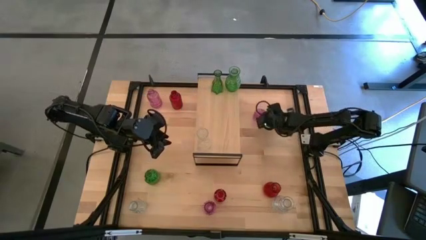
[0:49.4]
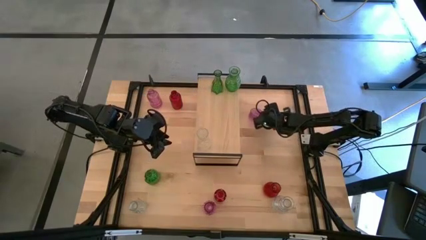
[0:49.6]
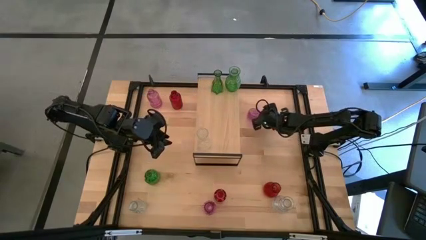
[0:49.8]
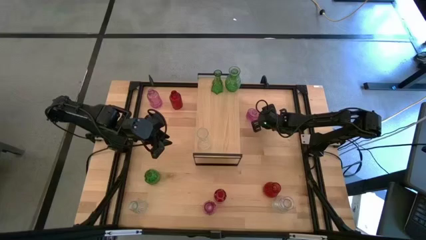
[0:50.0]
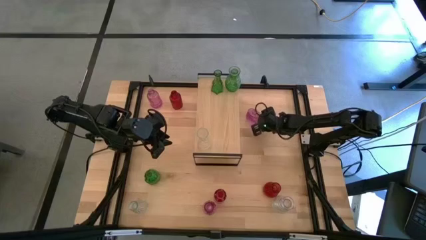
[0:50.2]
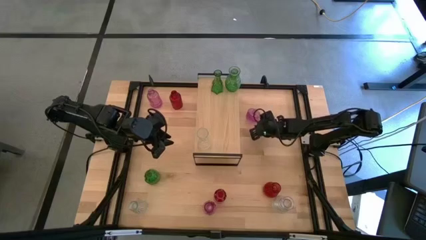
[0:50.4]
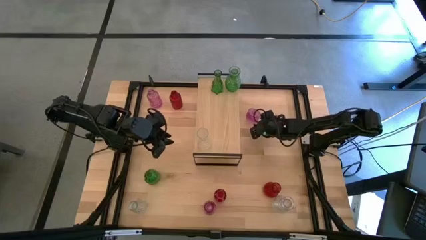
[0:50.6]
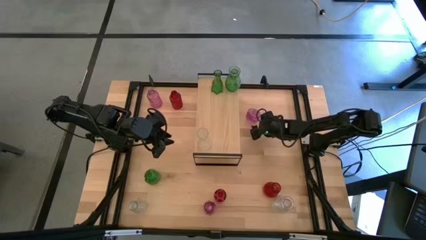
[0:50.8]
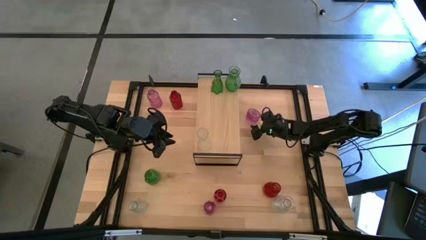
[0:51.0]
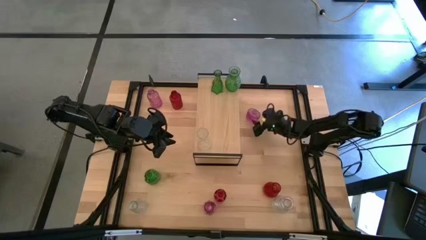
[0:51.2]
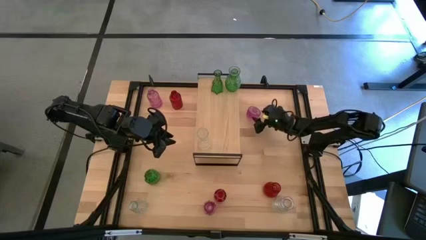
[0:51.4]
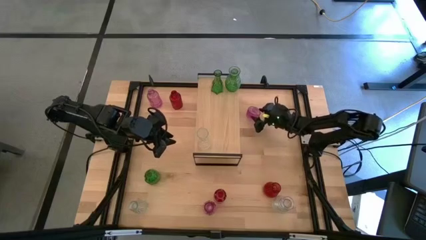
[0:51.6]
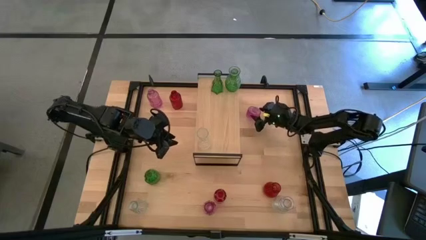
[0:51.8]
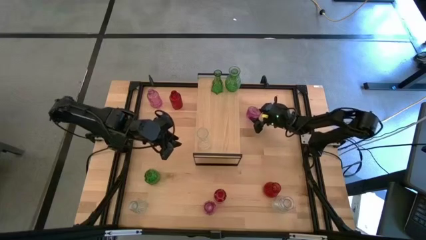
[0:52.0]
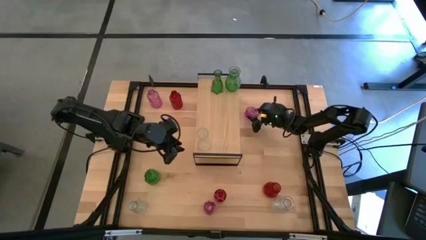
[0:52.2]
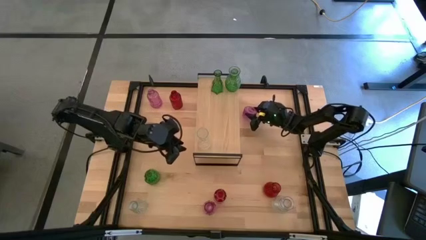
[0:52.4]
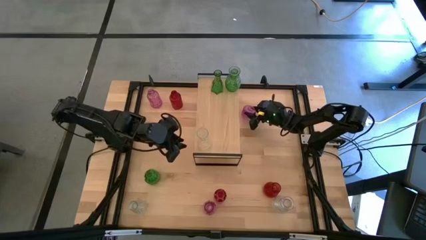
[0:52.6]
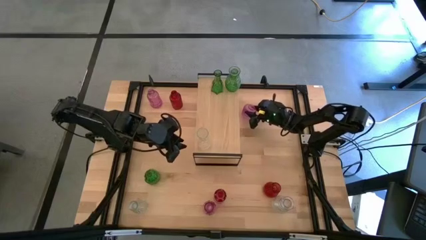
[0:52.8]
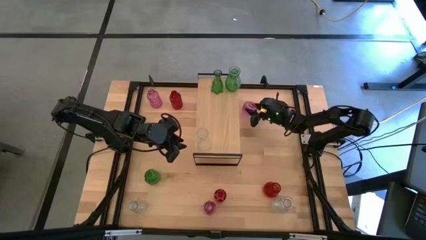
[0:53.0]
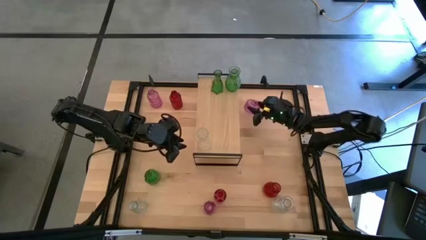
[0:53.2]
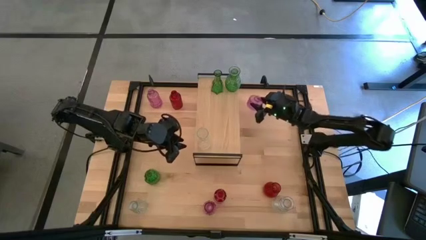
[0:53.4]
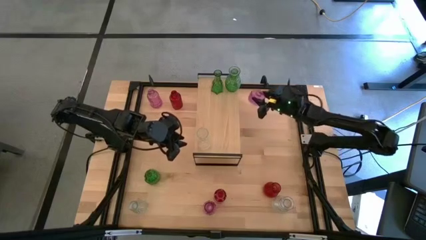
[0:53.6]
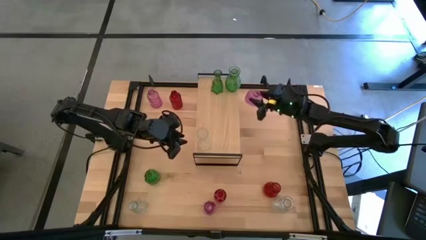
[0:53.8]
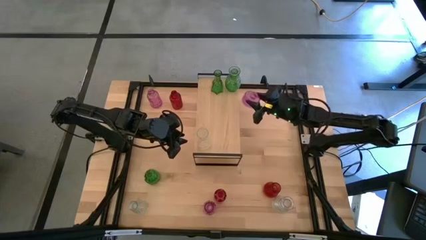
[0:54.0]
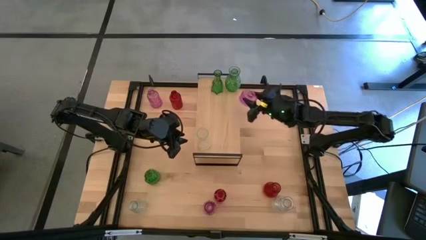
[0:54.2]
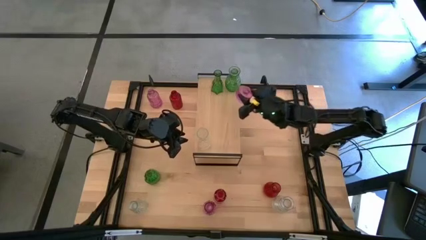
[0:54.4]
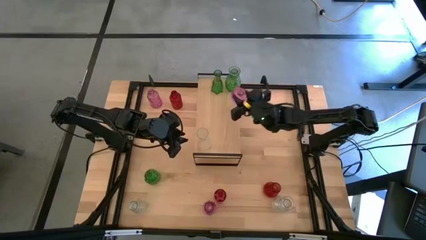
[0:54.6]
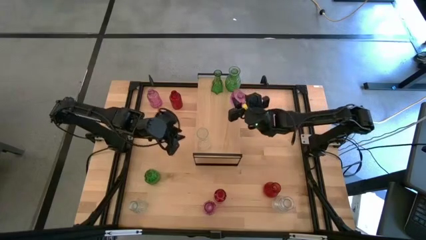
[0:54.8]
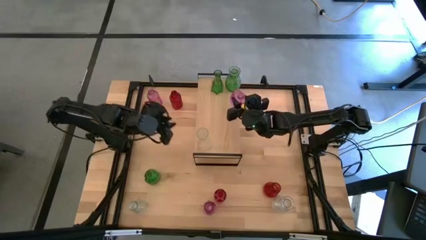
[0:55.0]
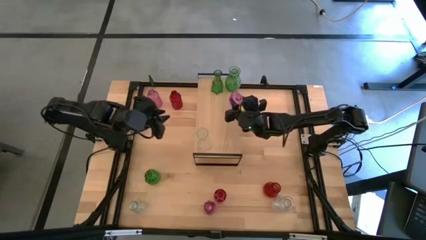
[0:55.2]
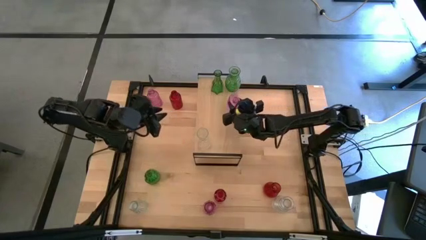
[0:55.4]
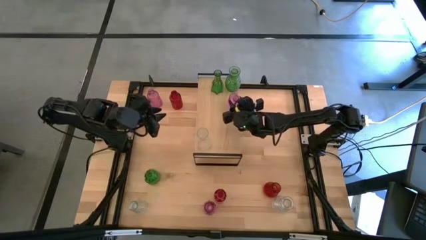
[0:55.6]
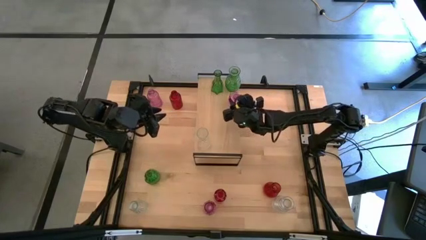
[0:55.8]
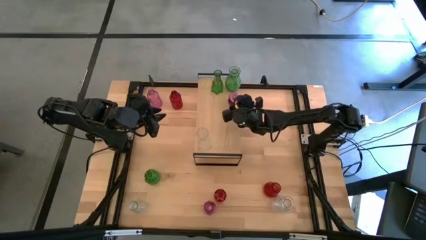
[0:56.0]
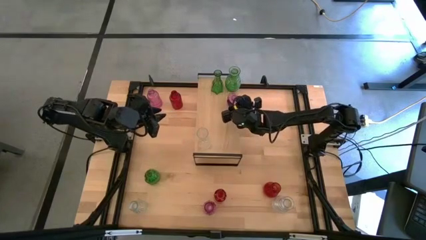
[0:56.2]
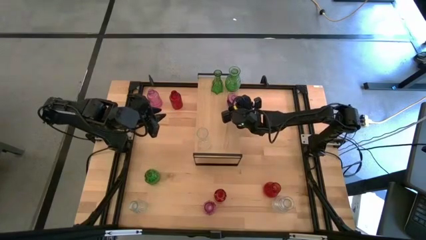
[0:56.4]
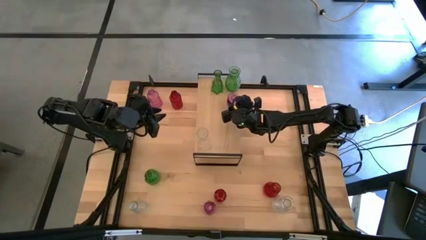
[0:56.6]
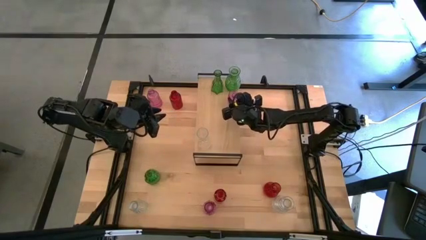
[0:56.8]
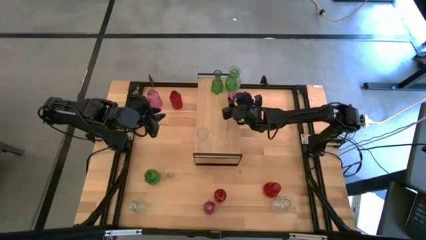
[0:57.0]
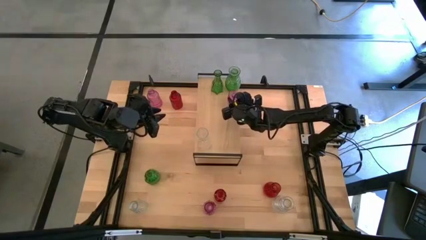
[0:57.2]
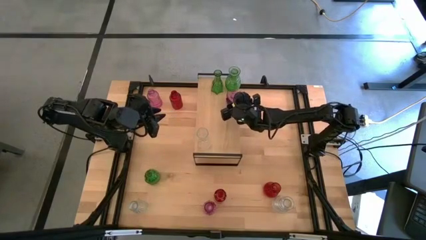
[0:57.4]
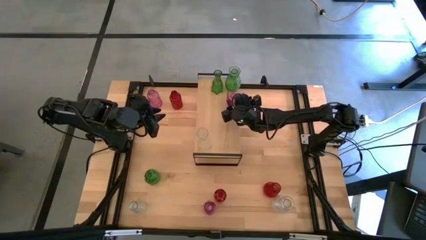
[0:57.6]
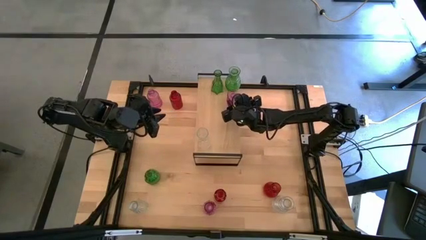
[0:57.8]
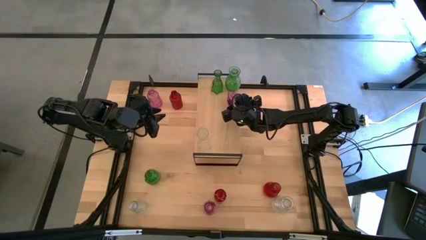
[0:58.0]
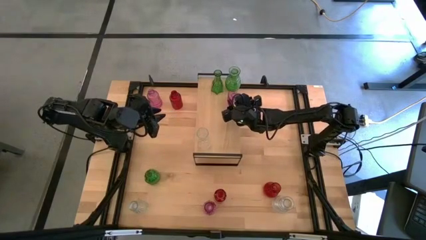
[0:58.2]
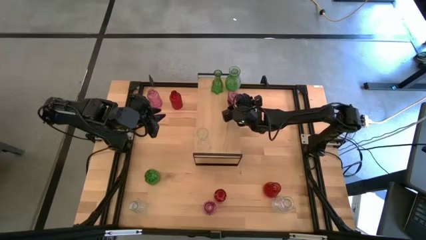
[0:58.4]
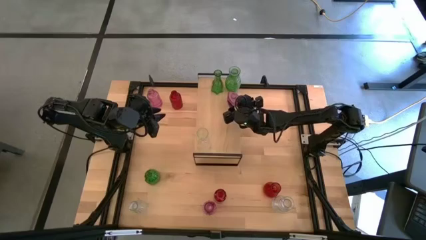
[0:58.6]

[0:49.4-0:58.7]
Task: sort vases onto shelf
Put the top right pink vase on the shelf

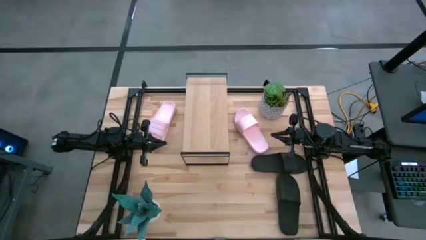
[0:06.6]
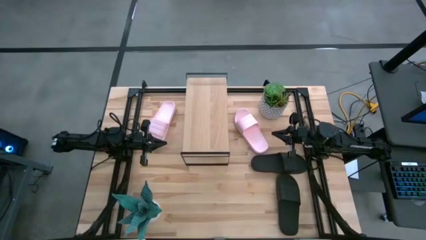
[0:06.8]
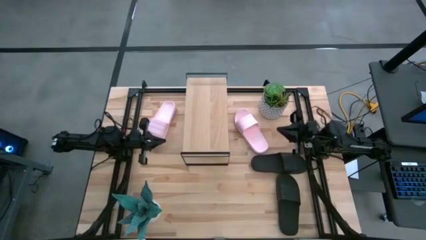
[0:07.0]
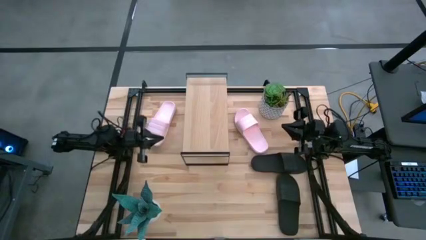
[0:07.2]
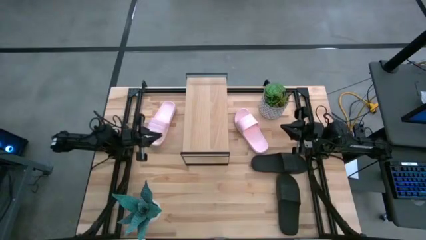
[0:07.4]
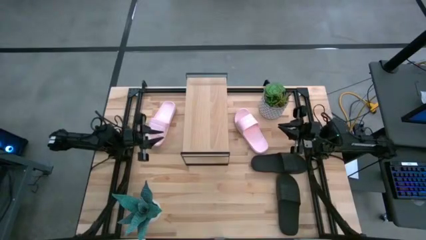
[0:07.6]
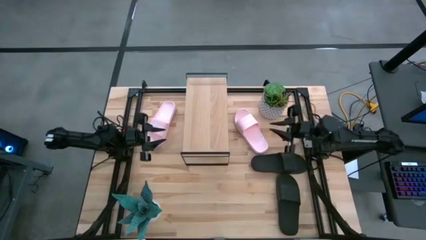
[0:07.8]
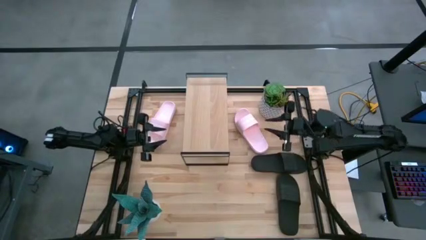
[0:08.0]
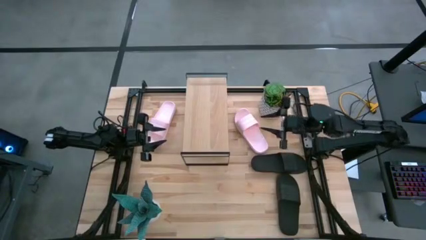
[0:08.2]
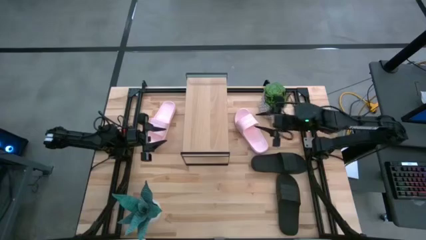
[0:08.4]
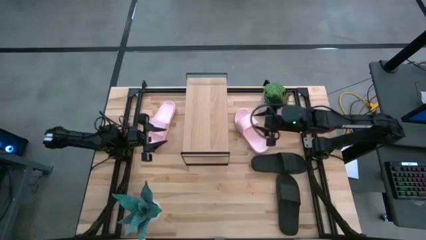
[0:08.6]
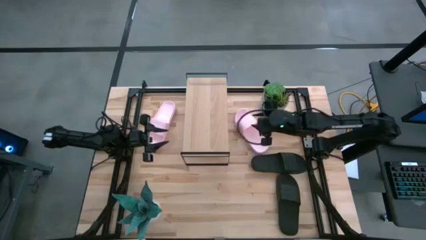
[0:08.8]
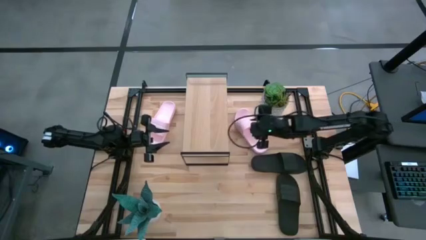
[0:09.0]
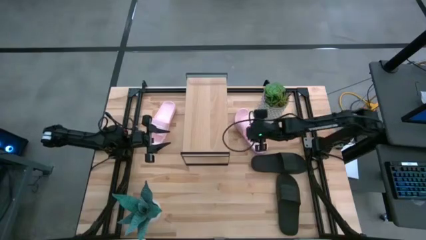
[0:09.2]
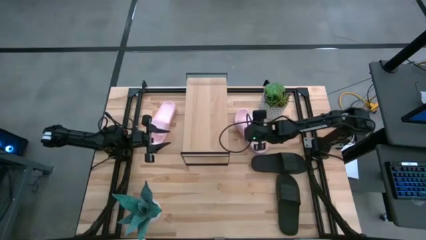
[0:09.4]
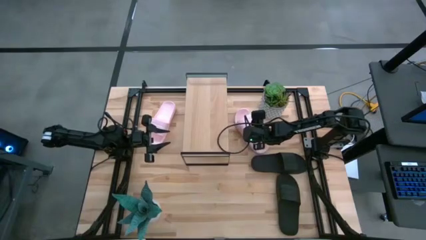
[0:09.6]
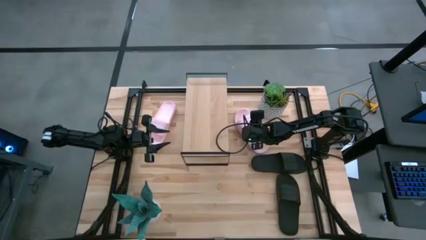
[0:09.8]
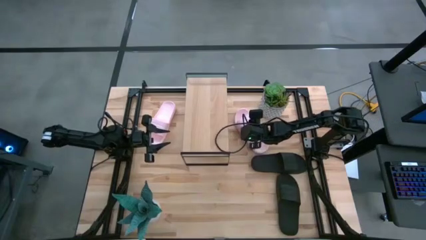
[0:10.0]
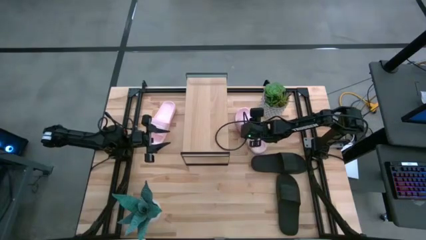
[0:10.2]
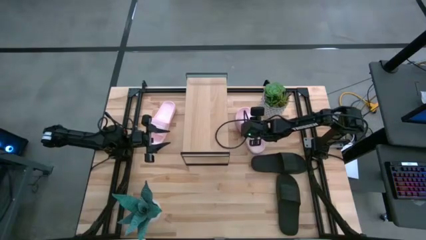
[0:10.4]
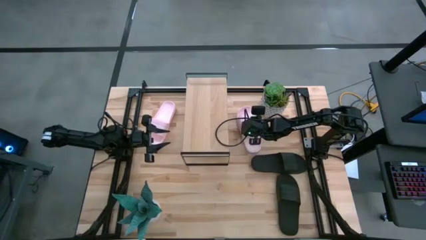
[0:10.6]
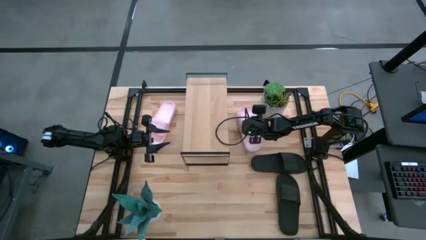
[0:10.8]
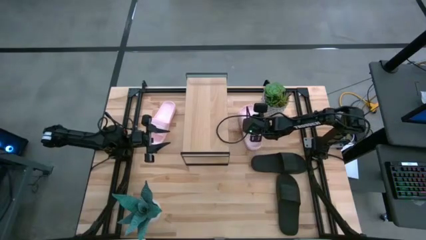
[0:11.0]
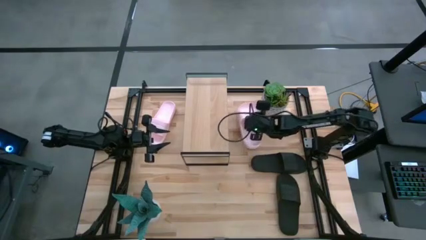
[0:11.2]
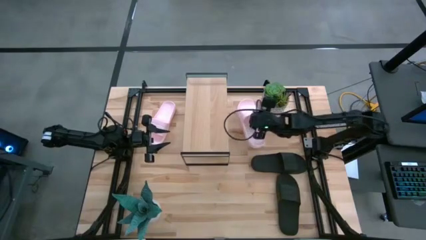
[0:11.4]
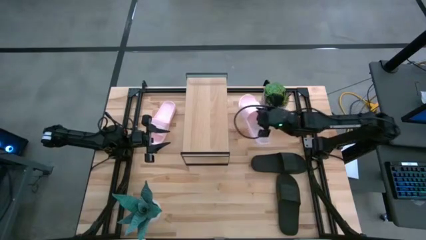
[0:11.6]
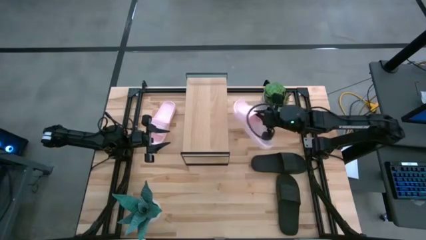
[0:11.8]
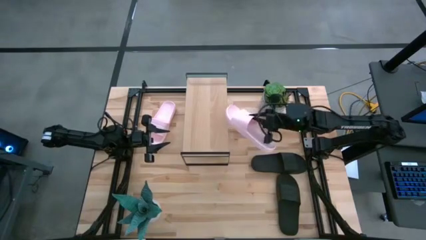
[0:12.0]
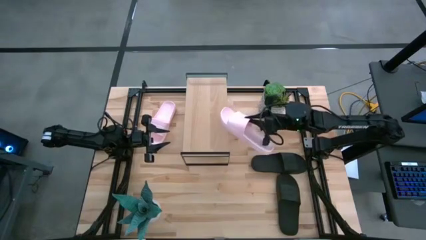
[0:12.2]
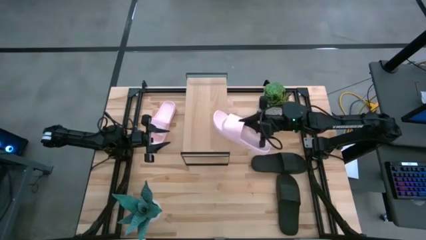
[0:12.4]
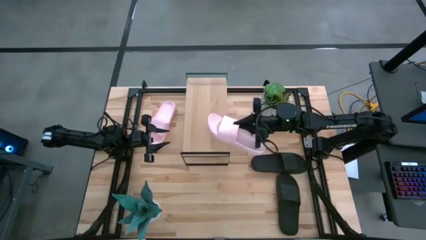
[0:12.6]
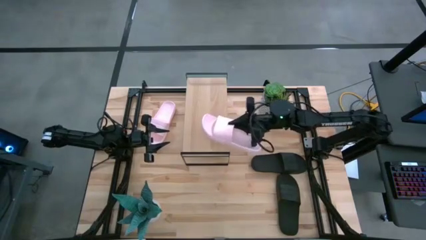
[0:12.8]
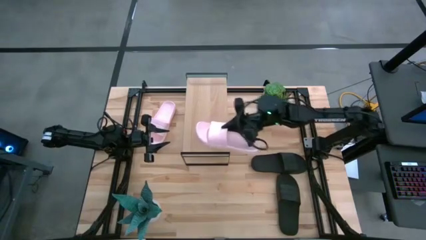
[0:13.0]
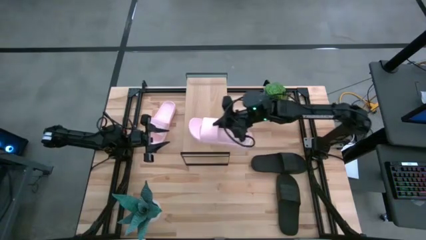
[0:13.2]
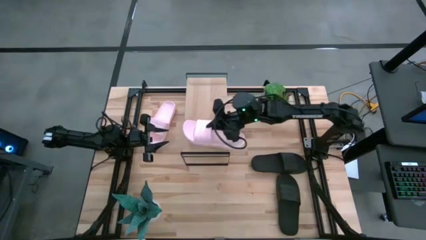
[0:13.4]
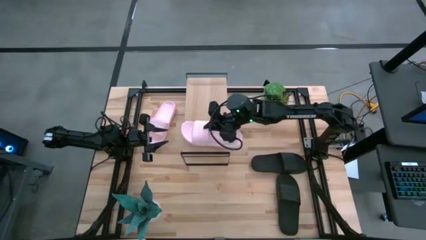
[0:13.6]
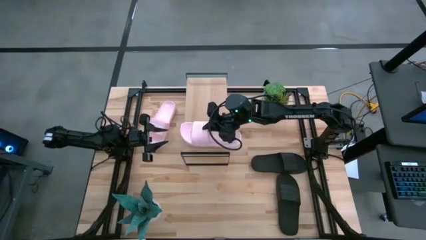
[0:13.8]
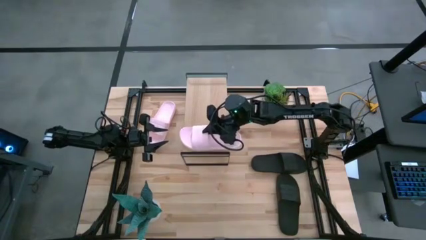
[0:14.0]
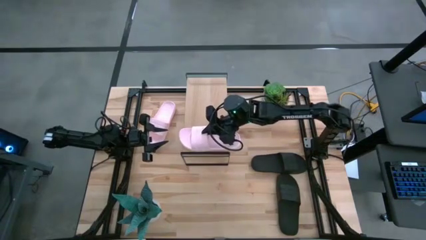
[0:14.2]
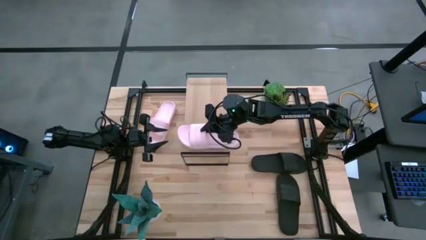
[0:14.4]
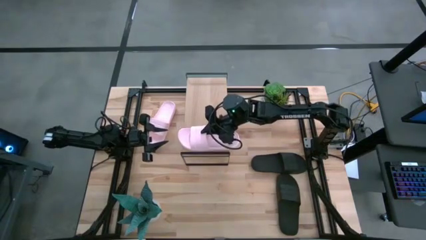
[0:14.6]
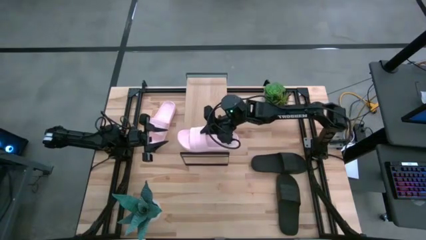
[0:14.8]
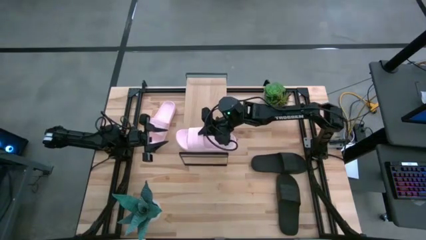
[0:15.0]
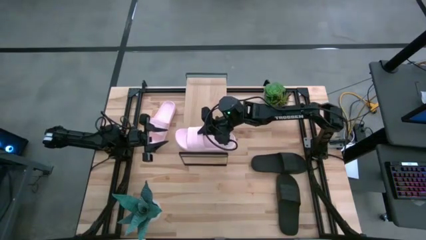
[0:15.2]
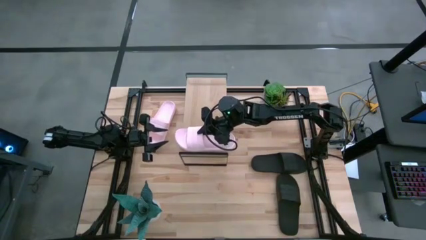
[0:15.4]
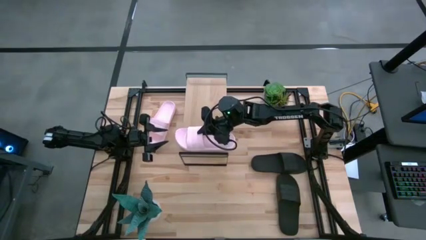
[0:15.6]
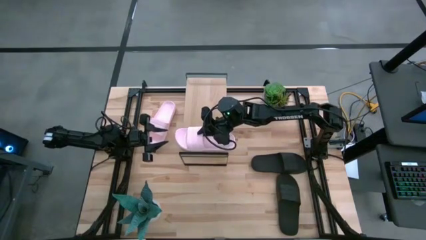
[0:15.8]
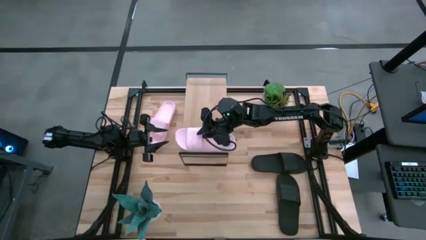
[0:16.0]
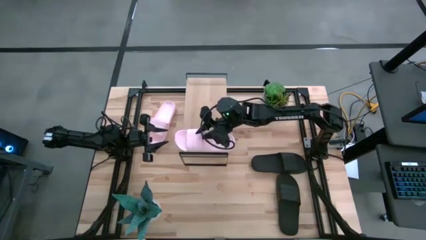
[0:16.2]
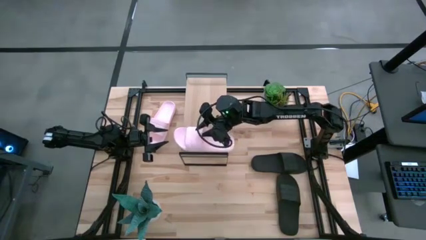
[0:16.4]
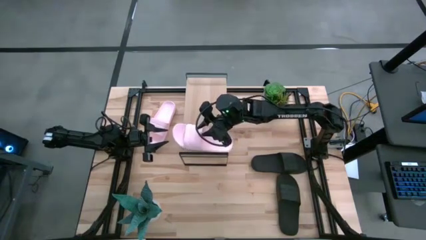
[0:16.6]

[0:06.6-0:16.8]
Task: Pick and place slides into the shelf
Put the right pink slipper on the shelf
